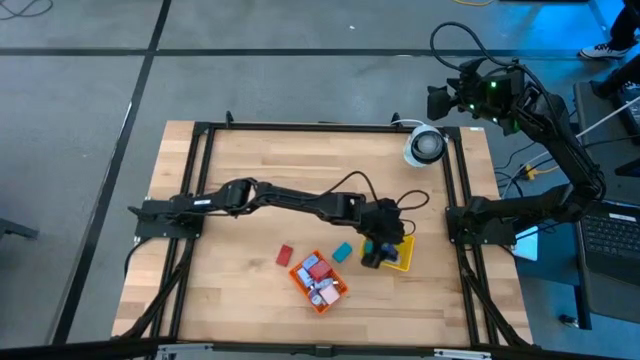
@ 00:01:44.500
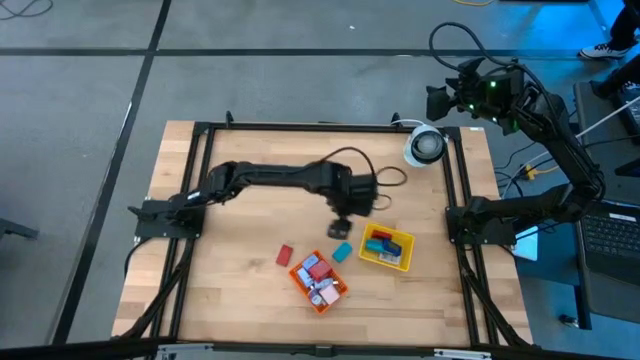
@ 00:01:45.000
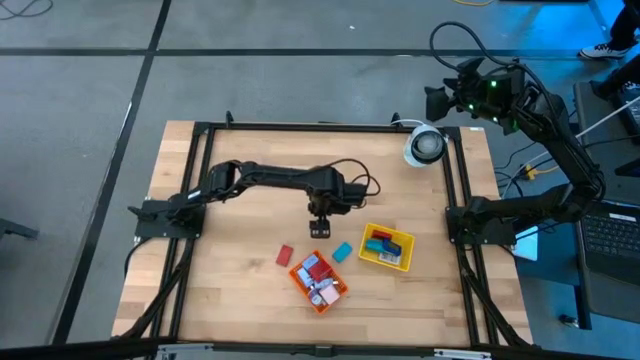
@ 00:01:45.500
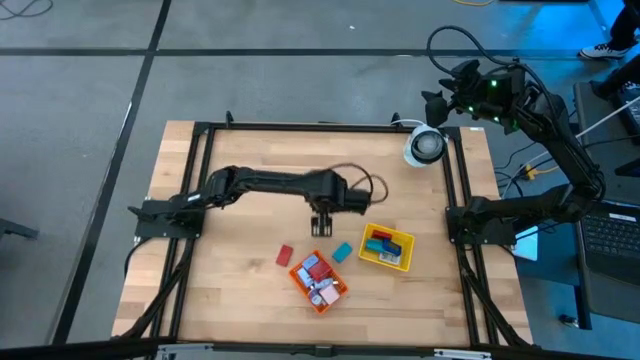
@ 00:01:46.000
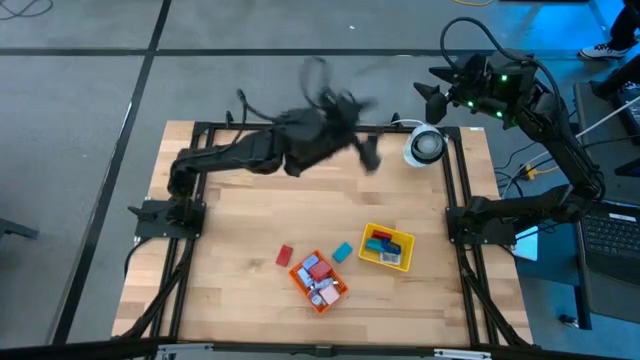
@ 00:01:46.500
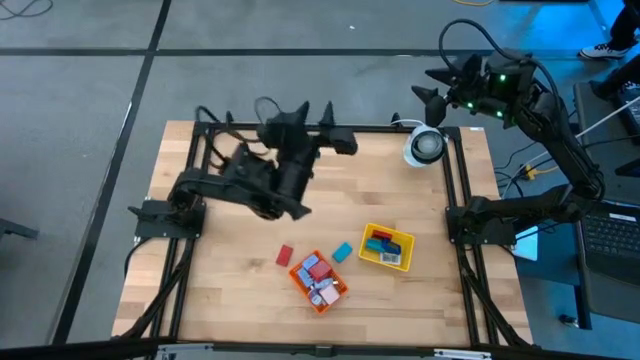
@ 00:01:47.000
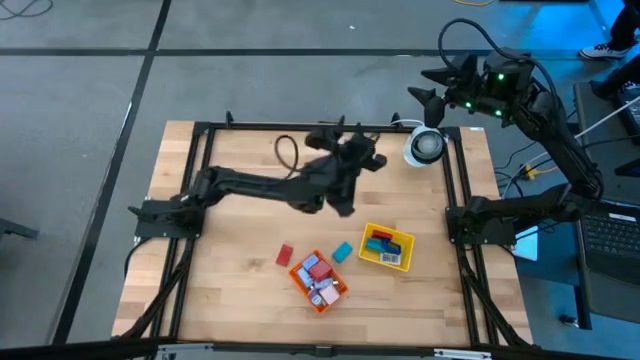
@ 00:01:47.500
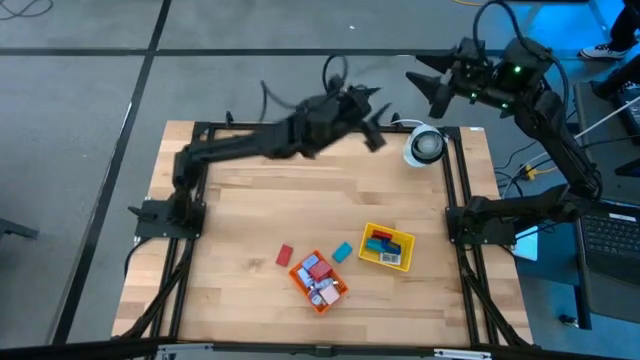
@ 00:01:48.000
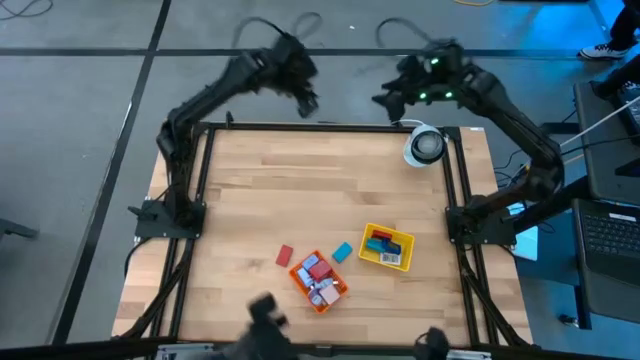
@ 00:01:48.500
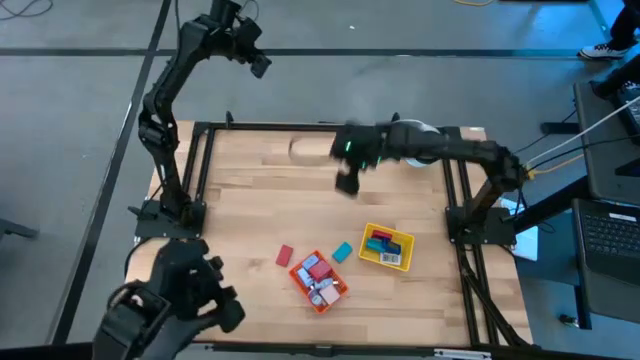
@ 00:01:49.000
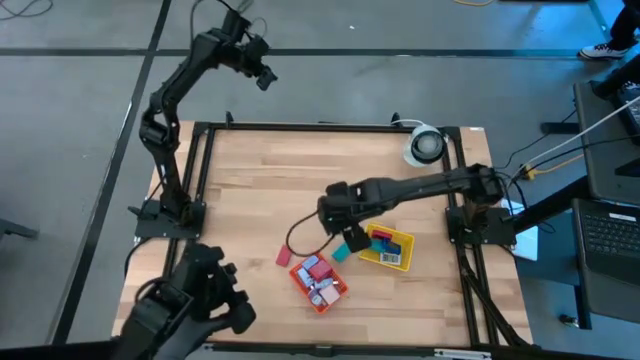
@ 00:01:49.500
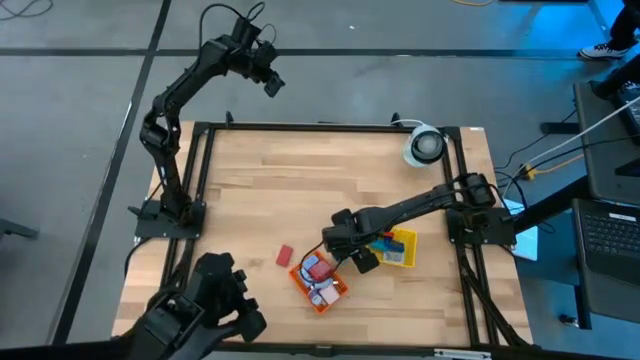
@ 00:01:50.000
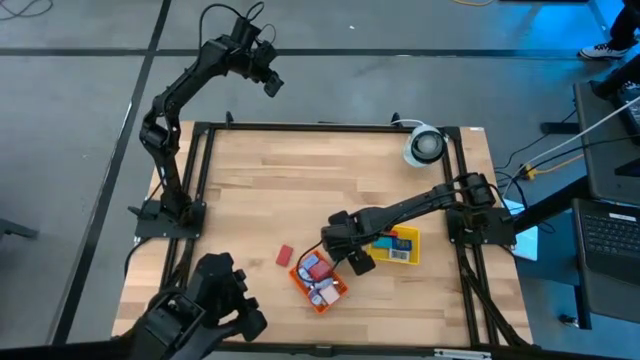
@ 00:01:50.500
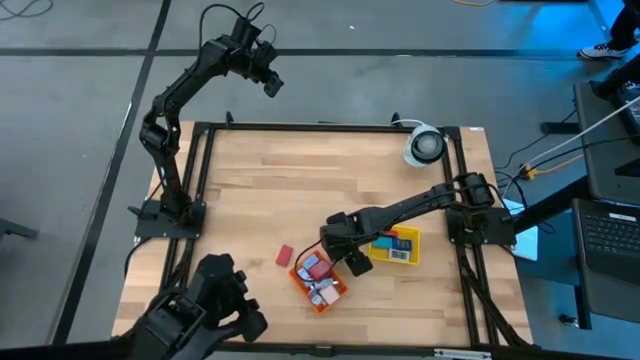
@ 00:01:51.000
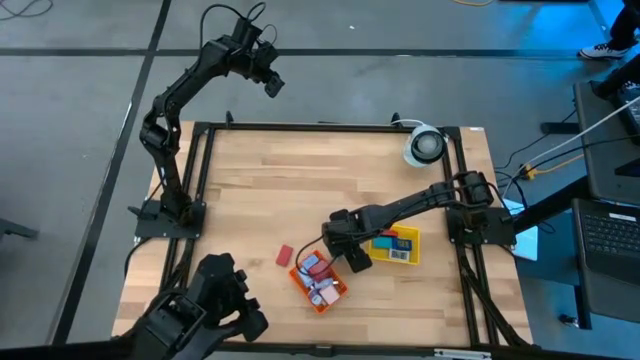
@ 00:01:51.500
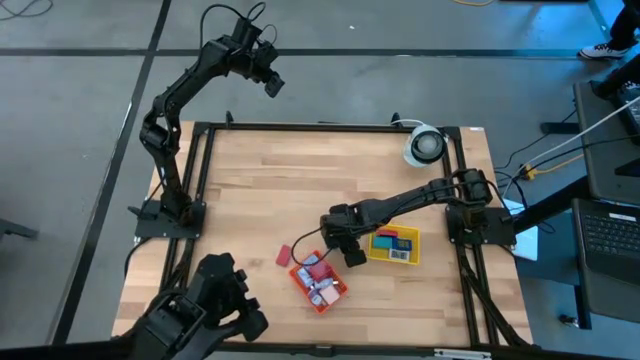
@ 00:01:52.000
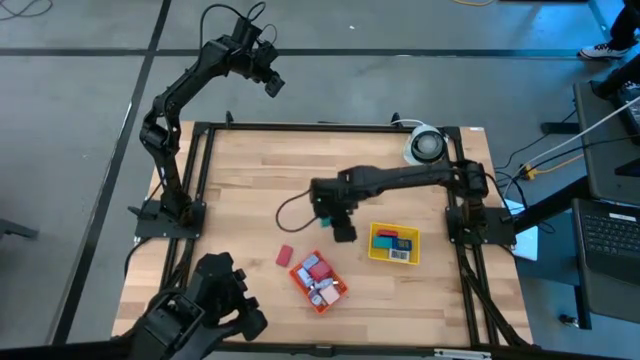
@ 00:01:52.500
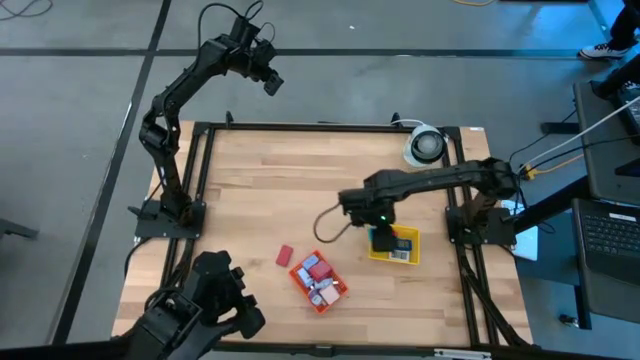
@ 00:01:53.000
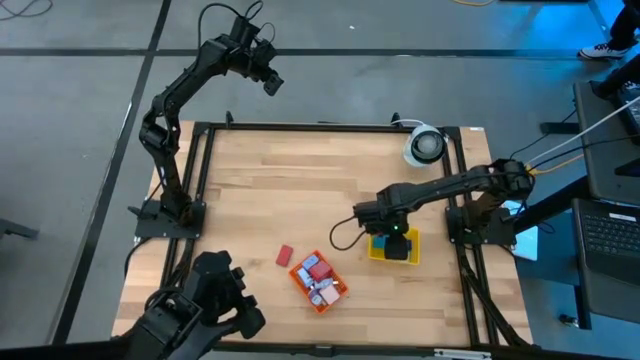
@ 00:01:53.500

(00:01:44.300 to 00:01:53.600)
Task: Pick & Place Office items
Put the light blue digital clock into the yellow bin

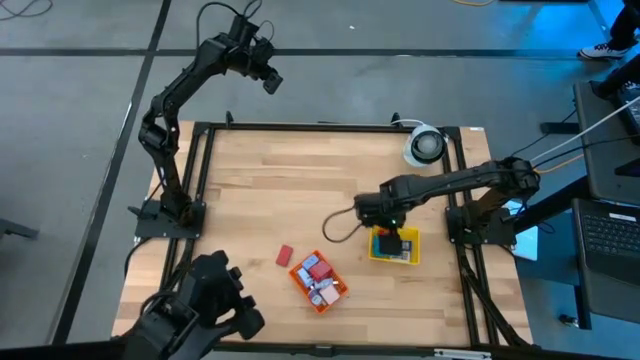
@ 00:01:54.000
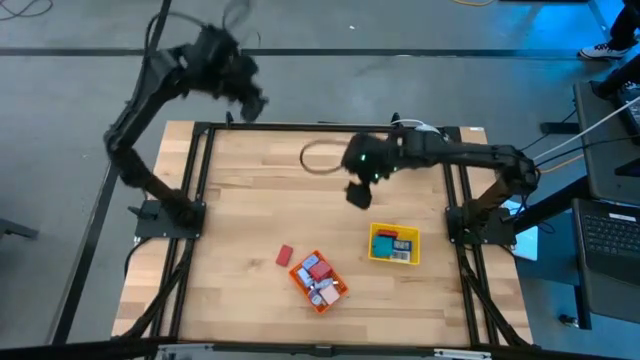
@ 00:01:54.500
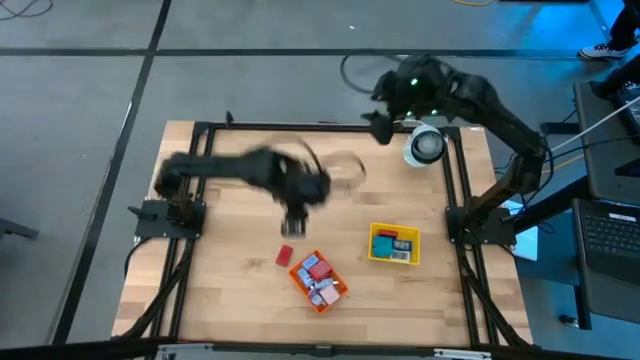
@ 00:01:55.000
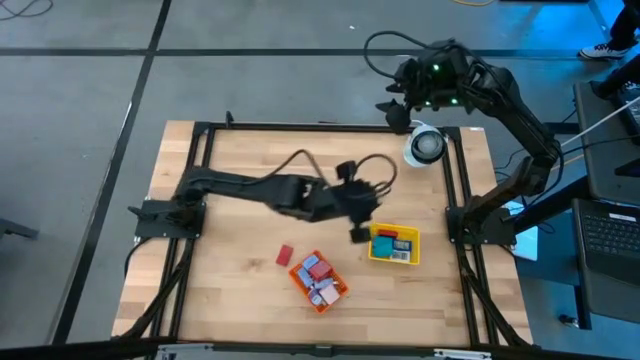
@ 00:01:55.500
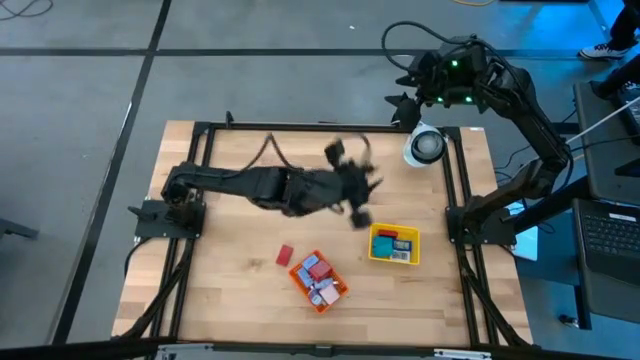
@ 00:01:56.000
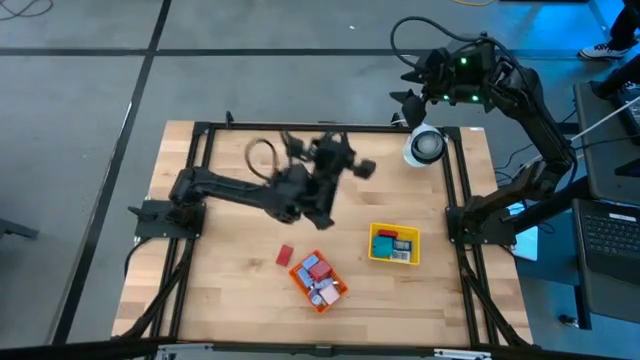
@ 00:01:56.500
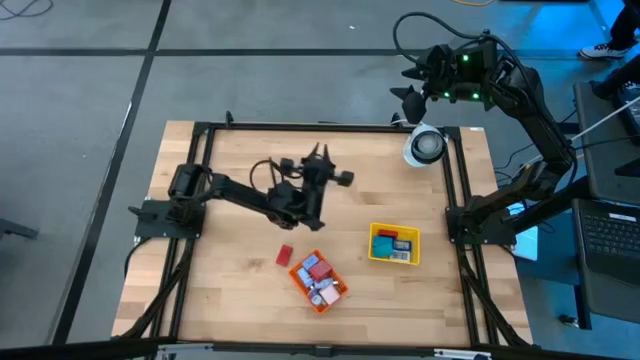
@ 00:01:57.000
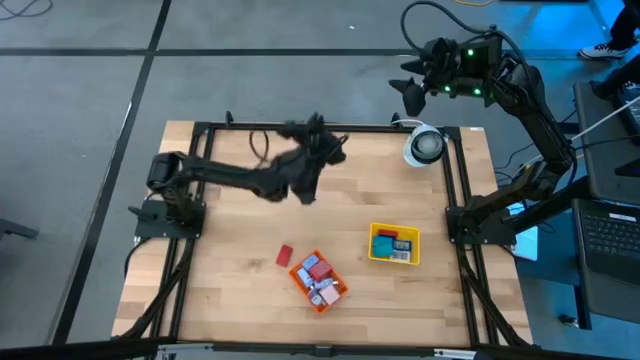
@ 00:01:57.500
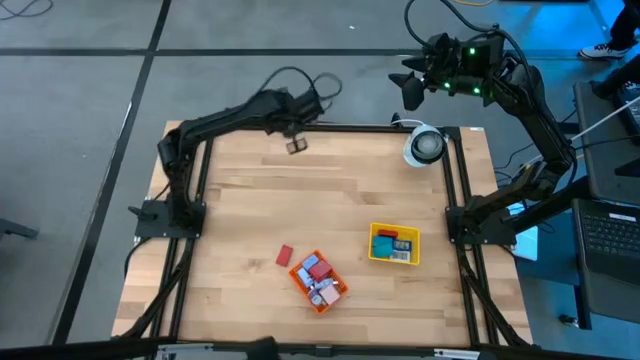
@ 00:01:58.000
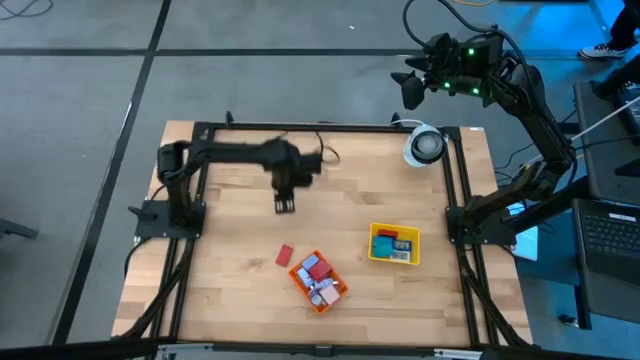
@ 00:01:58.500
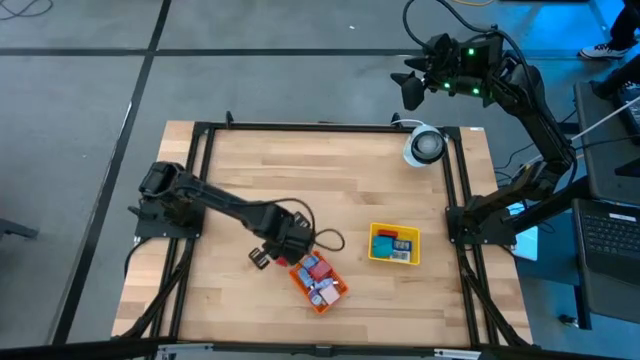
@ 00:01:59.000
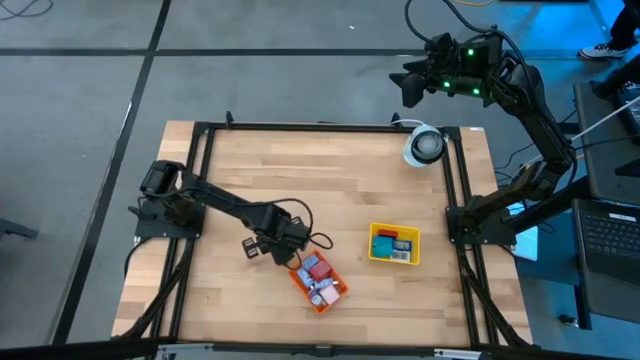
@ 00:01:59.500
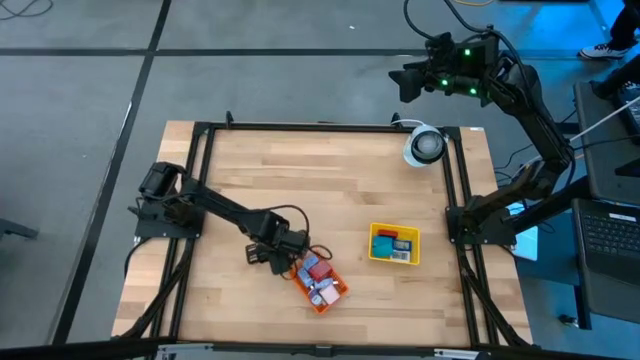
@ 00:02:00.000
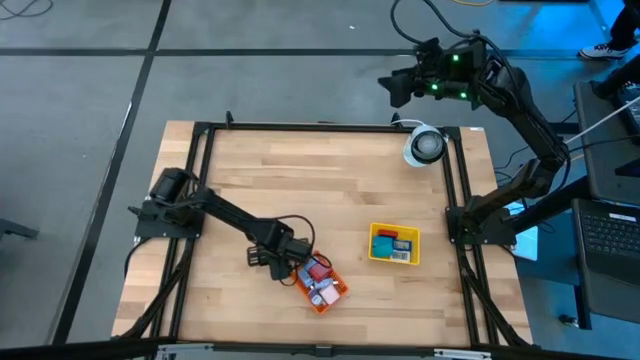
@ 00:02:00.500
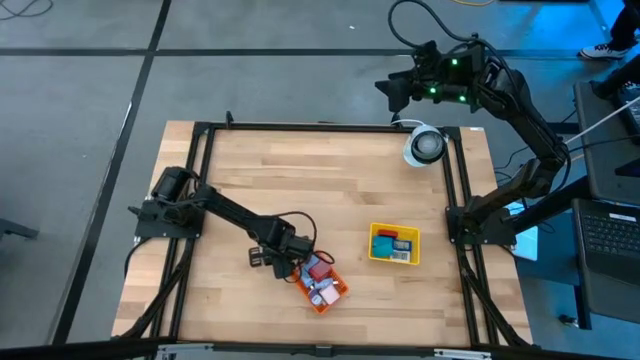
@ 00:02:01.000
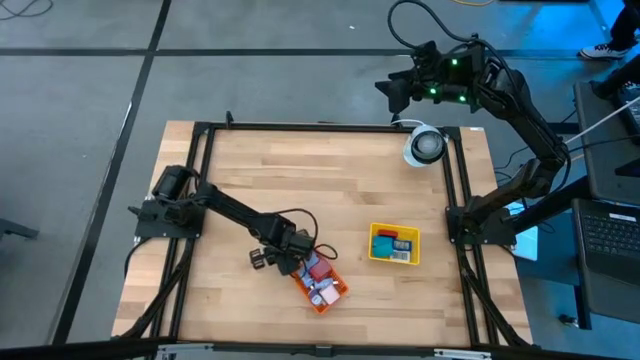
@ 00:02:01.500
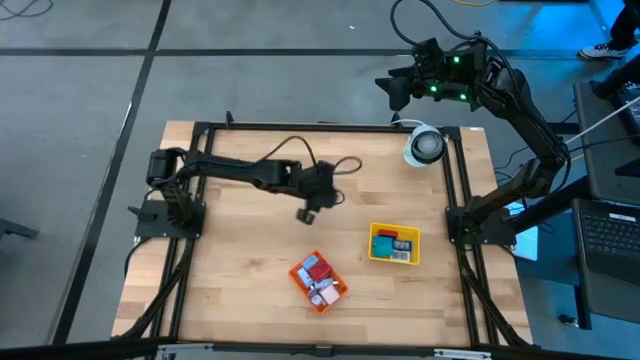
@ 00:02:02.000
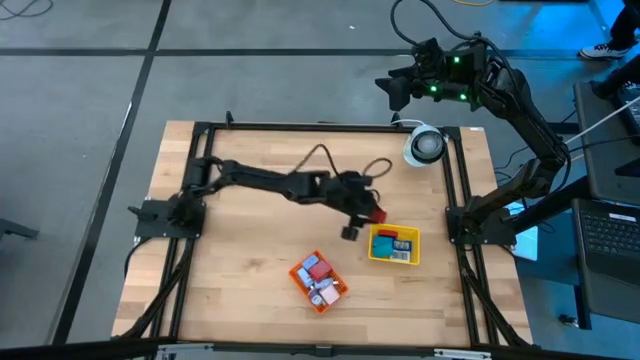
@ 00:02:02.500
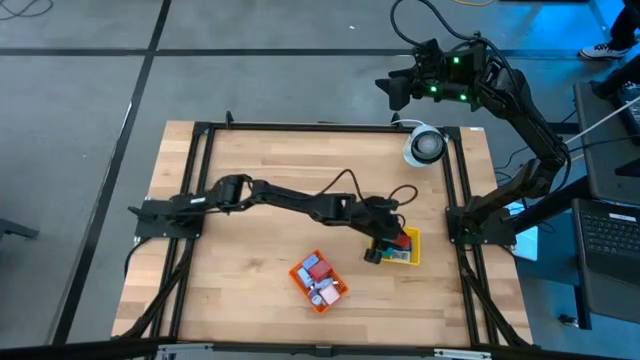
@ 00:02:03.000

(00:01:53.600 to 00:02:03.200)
Put the red digital clock into the yellow bin
